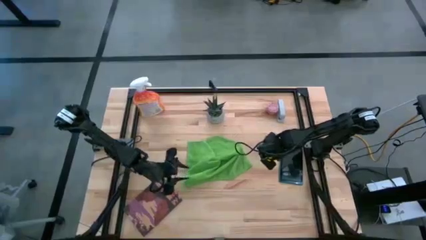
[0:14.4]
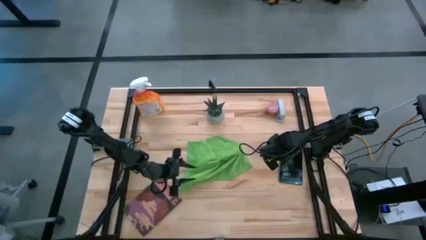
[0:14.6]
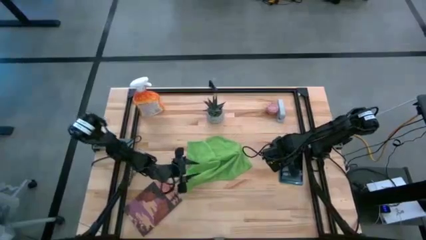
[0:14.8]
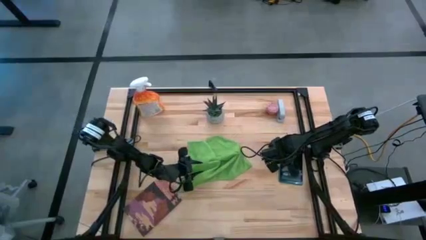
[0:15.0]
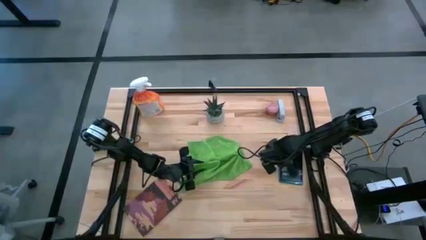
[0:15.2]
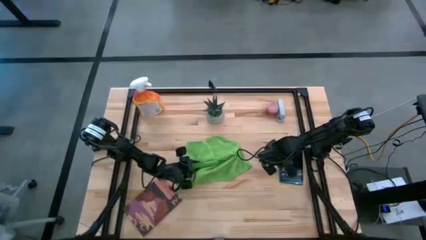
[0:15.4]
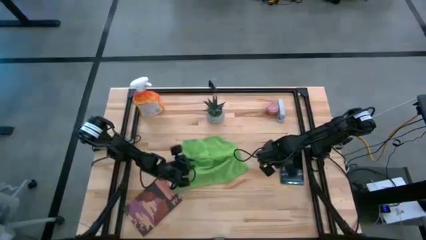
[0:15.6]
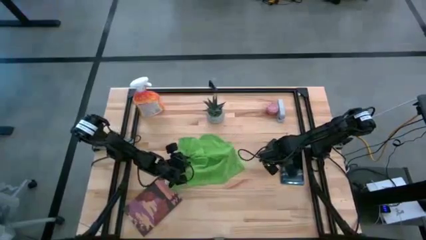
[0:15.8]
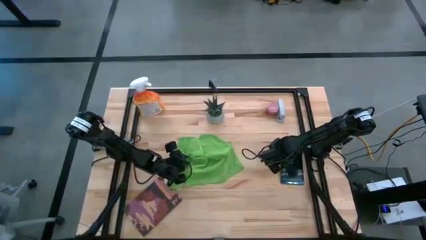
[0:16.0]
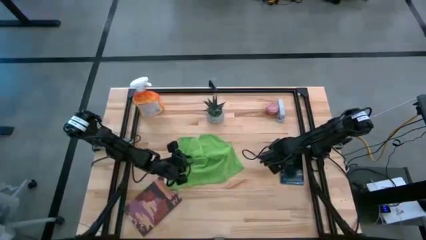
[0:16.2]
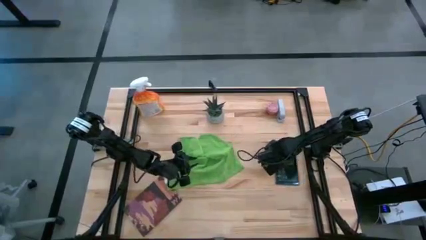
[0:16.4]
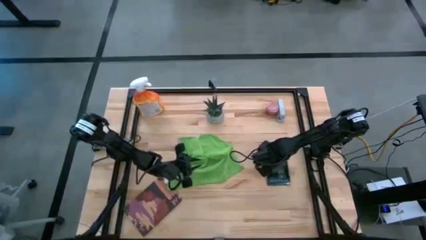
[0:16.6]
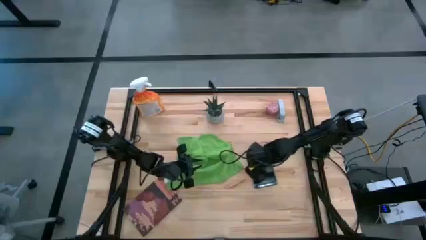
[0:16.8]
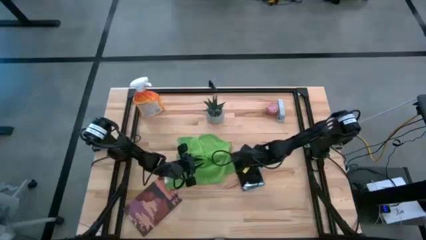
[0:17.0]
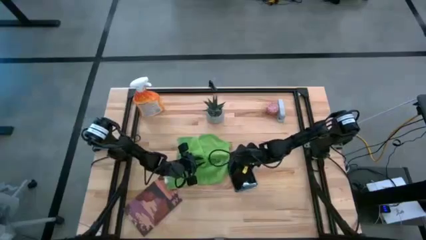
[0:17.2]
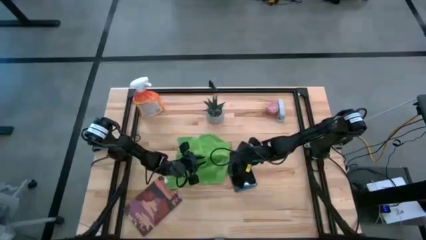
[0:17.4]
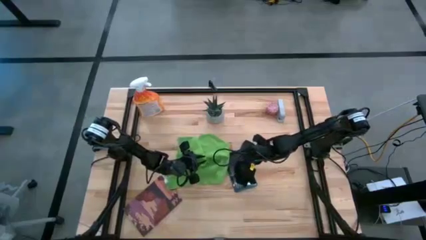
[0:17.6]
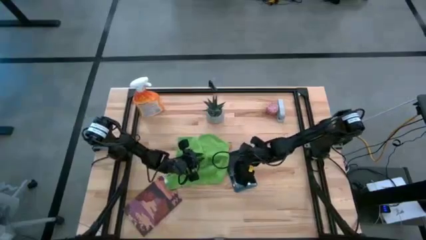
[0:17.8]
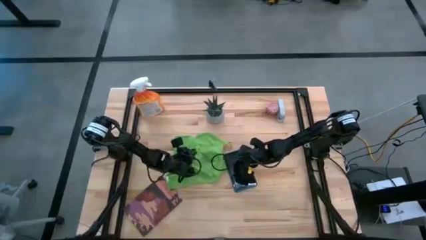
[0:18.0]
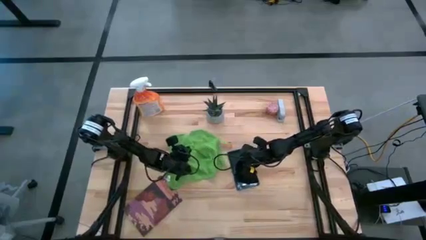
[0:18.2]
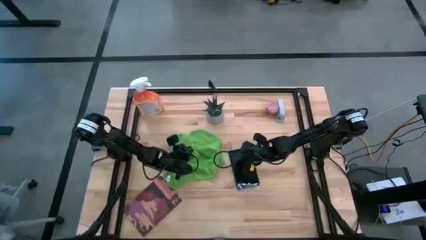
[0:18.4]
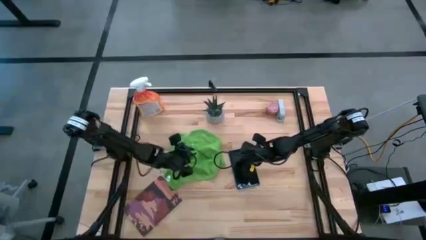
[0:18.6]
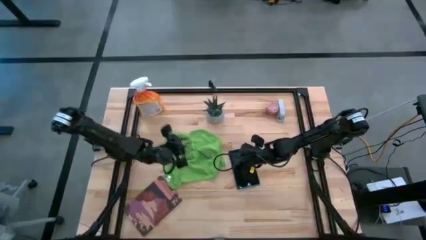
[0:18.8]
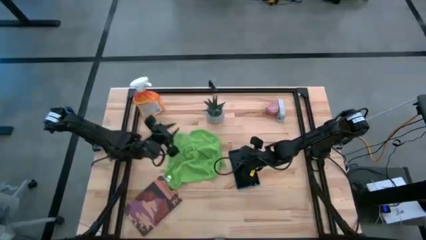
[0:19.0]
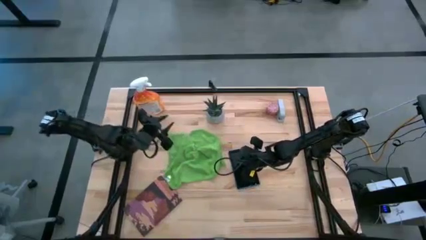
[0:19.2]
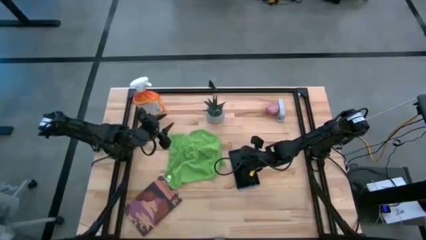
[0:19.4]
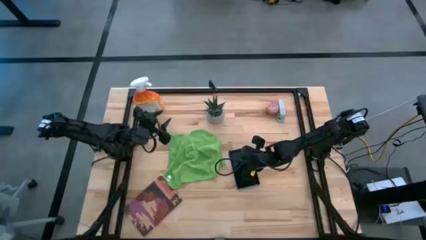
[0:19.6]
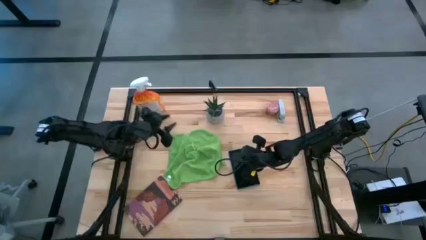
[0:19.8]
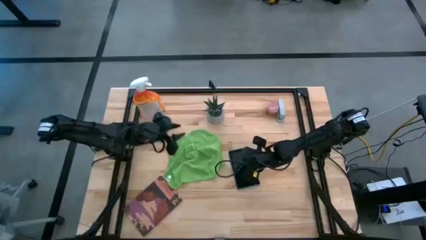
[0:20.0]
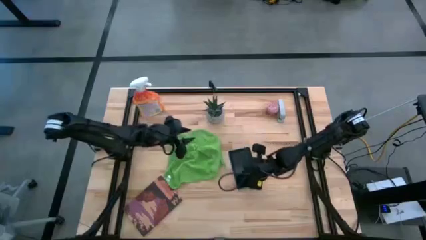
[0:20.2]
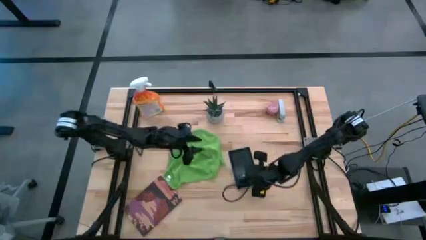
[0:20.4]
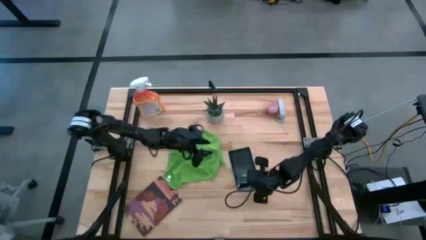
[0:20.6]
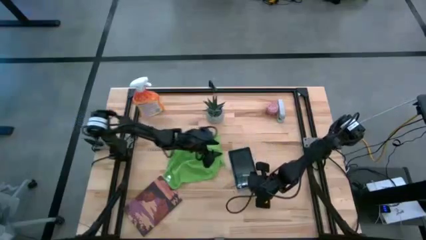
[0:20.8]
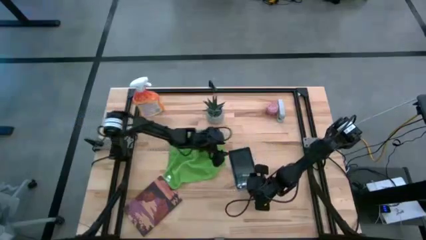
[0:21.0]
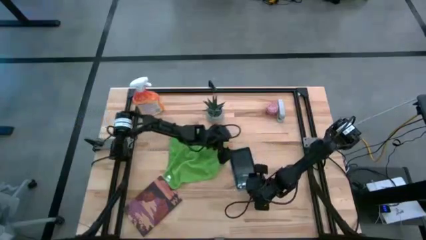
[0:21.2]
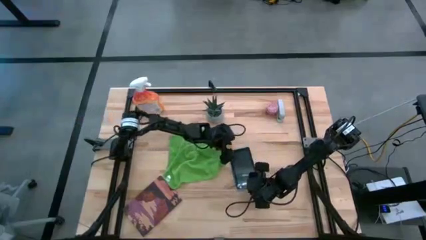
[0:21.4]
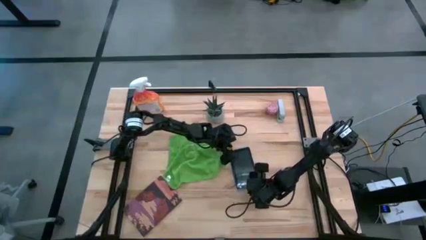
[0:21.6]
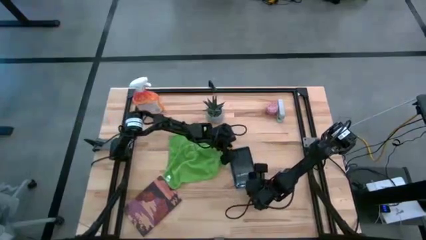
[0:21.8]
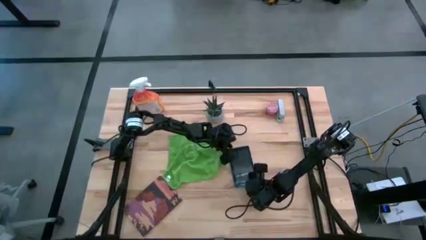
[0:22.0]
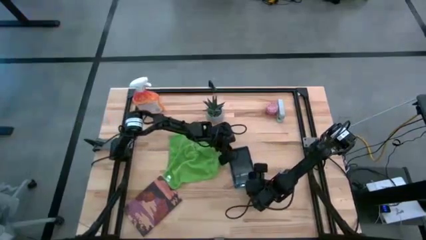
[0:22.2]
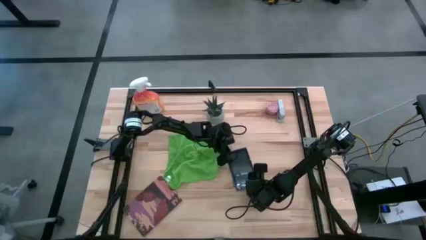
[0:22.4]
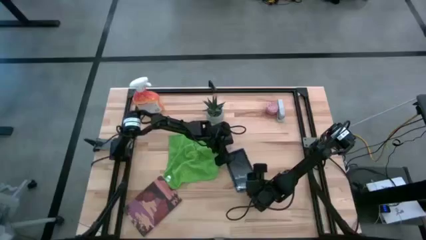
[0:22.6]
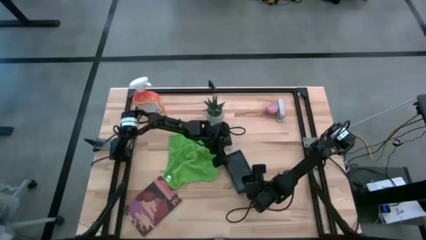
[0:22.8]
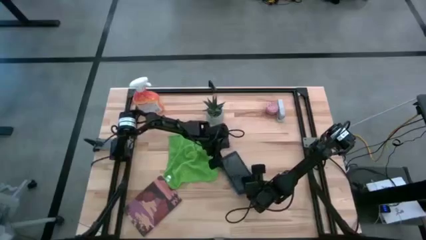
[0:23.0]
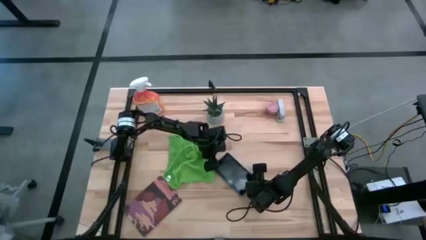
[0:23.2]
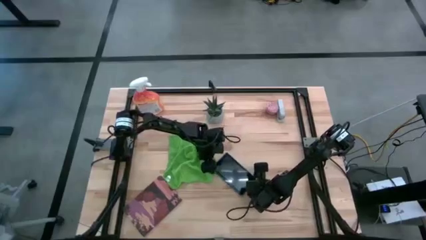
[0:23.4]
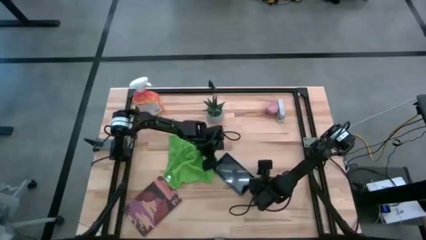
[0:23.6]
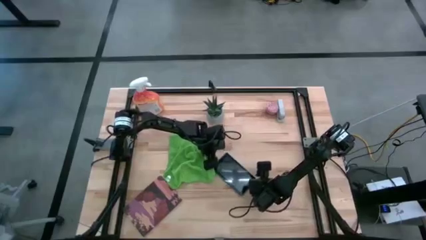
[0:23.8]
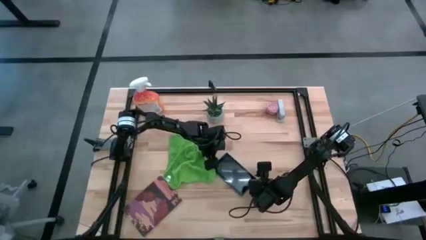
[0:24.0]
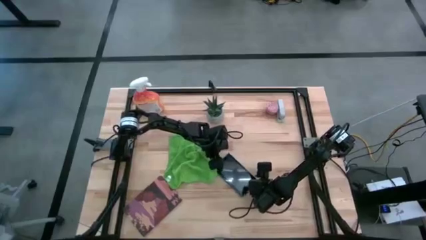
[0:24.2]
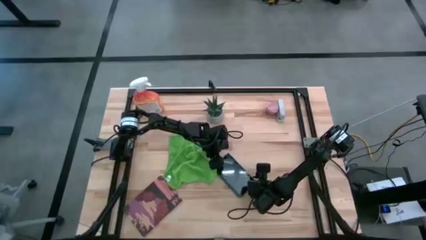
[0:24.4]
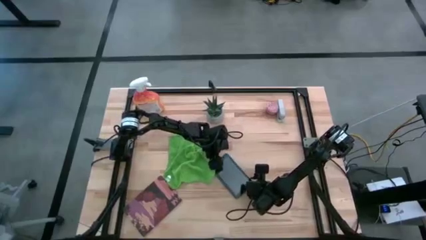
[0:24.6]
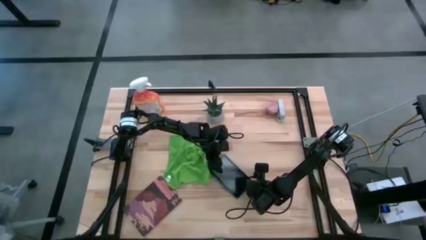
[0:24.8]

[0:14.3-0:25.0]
Task: Apply microfiber cloth
Spray the front and back of the tablet with the spray bottle

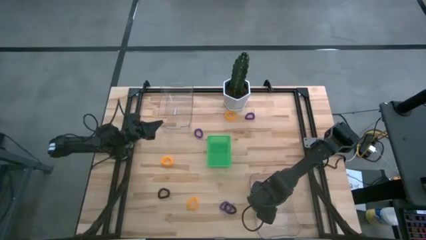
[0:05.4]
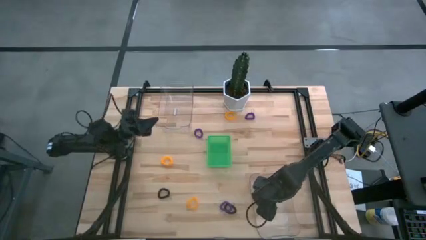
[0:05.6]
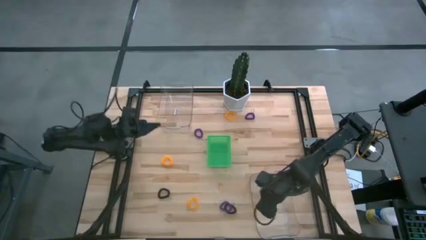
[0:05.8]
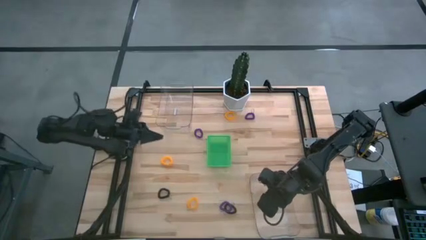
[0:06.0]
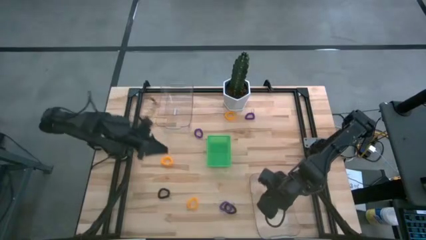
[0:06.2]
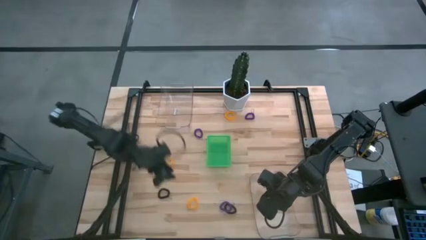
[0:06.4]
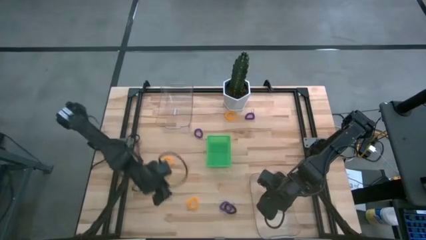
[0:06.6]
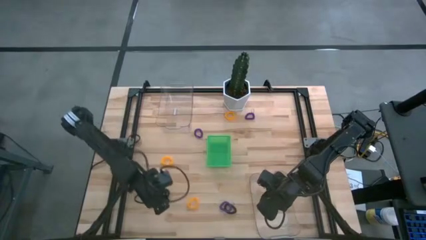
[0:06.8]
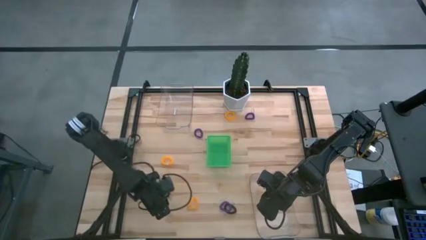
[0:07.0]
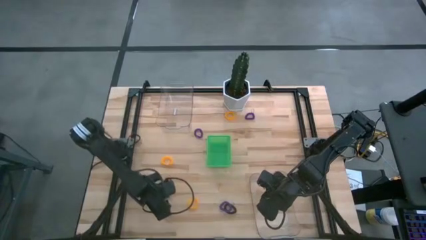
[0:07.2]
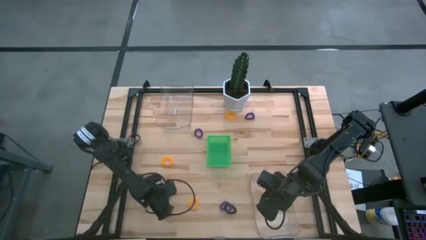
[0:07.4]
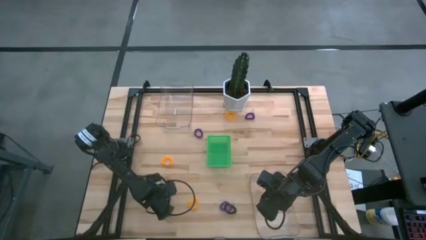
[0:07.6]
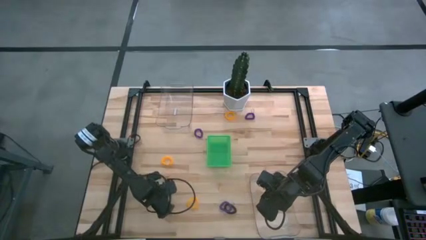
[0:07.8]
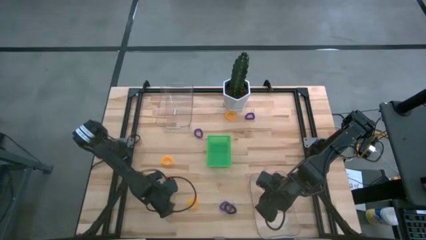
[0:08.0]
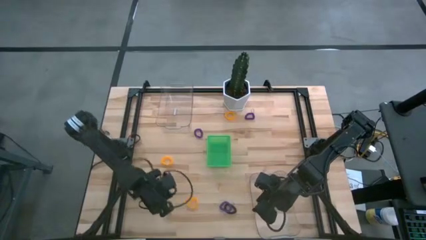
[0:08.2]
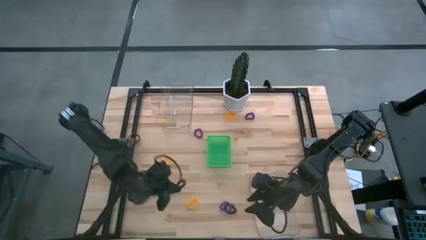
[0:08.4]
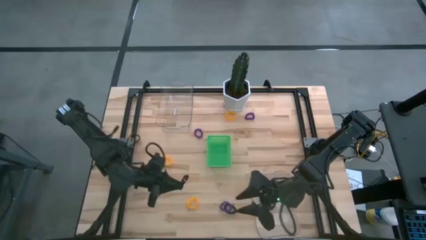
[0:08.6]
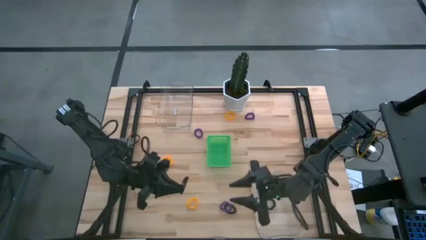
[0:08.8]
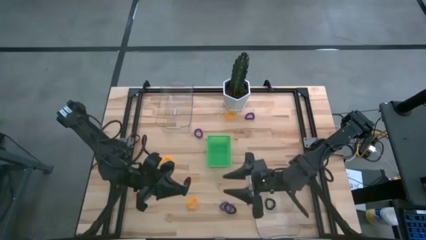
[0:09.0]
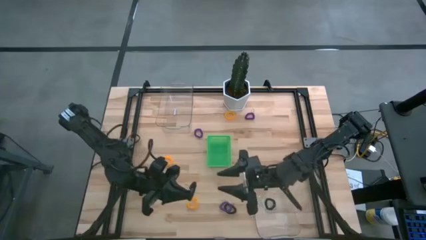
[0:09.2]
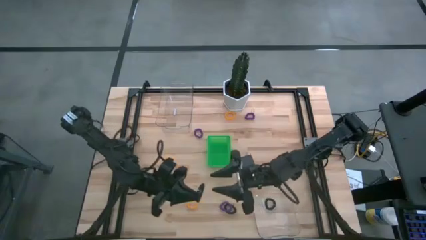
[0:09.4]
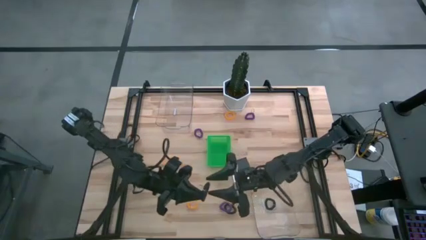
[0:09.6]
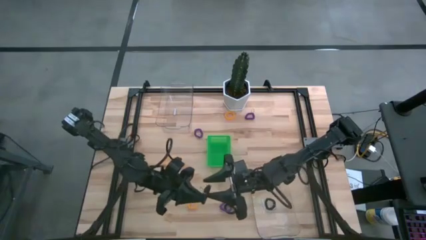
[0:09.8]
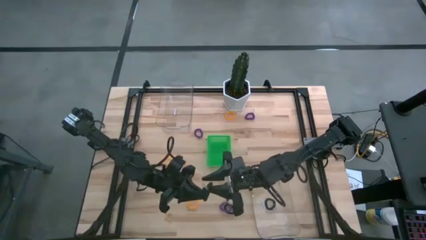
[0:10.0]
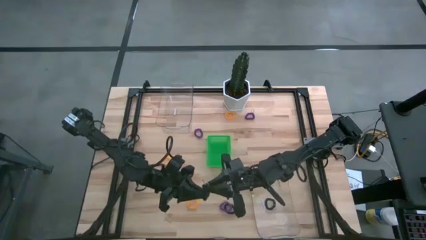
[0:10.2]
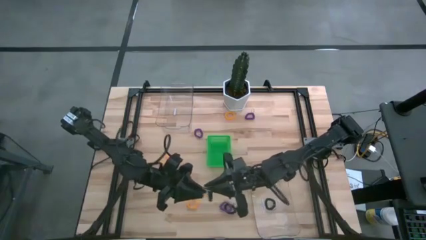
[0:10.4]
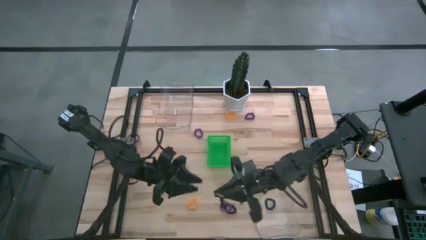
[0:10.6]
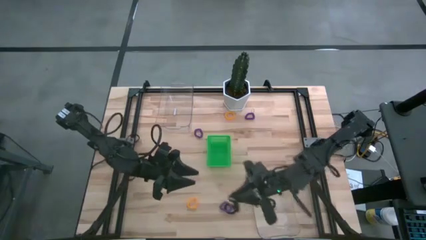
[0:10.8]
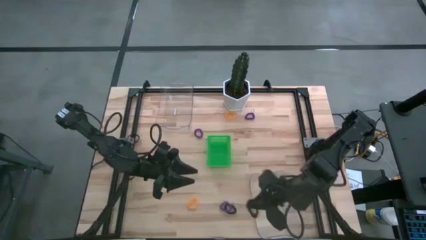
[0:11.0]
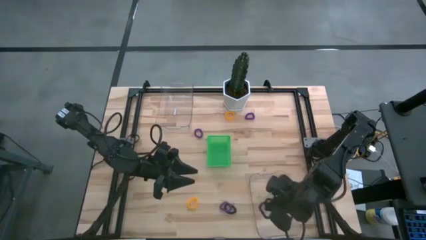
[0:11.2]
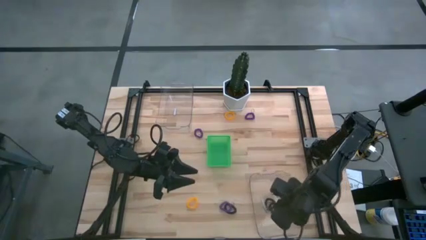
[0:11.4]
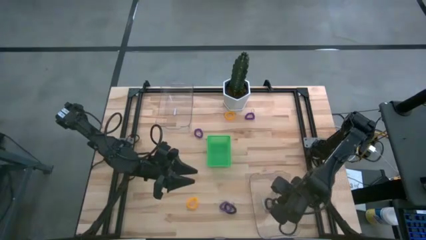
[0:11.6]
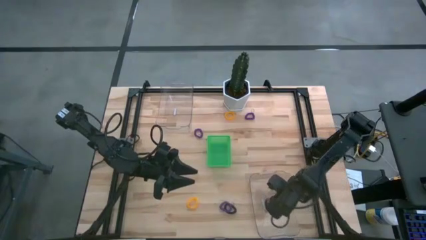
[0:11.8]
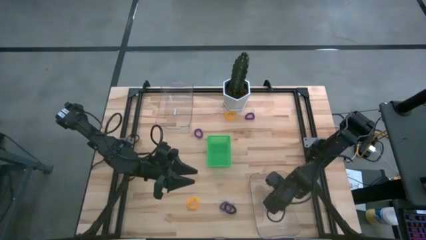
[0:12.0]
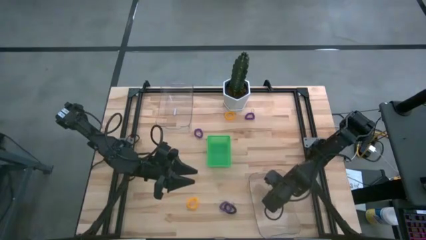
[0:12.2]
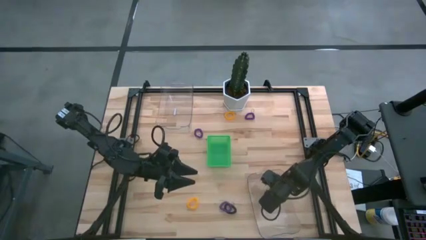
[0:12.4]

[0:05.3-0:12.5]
Task: Sort spring keychains
Put the left black spring keychain into the bottom transparent bin
